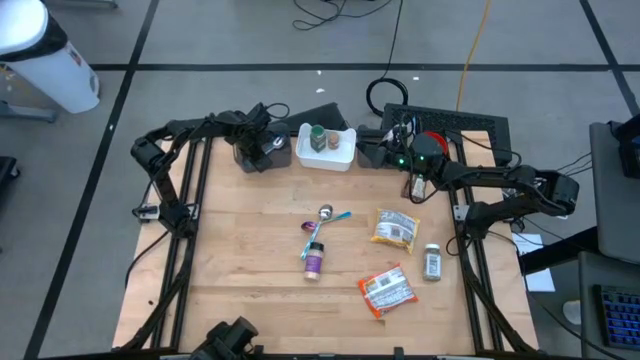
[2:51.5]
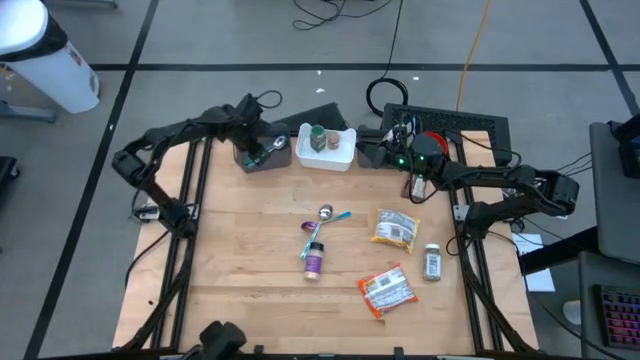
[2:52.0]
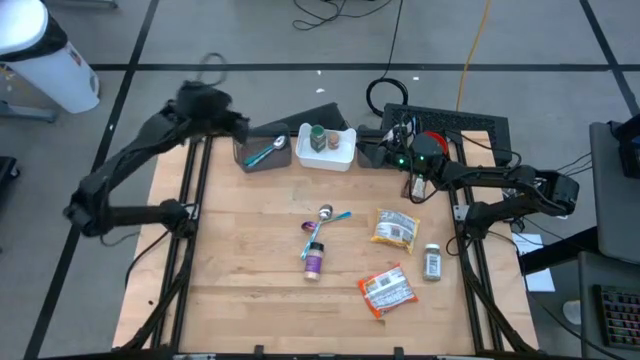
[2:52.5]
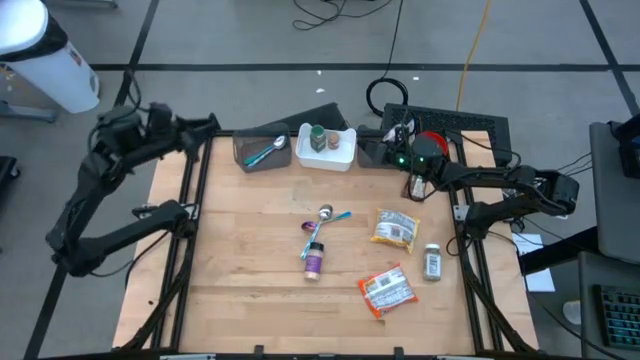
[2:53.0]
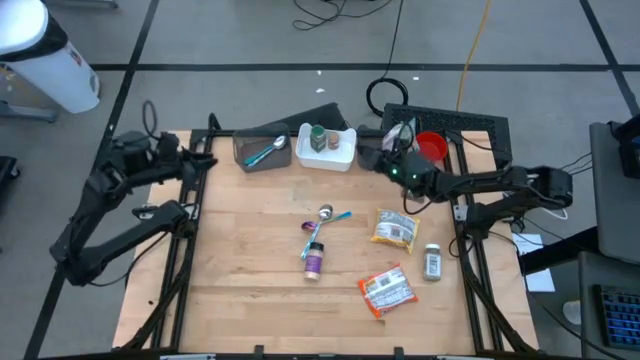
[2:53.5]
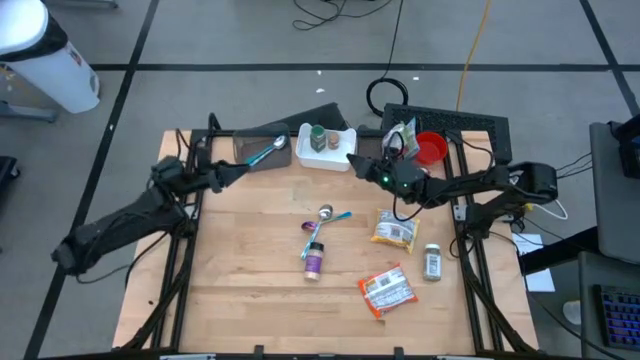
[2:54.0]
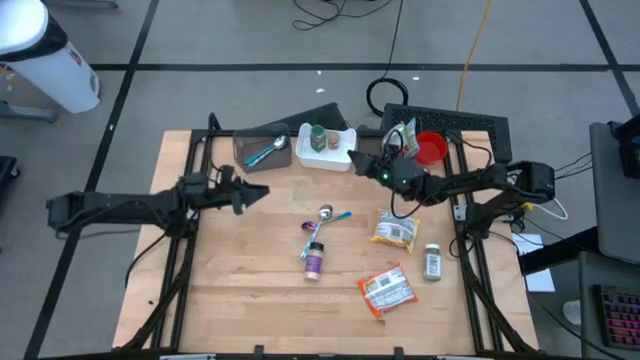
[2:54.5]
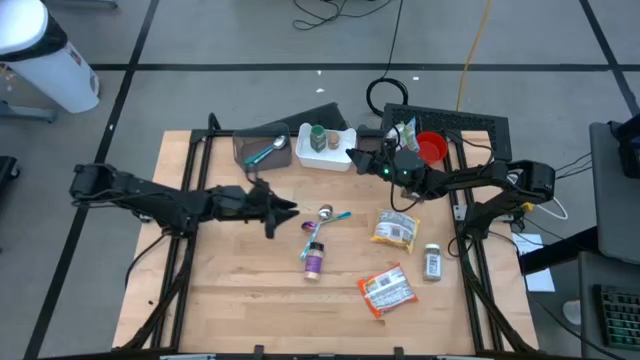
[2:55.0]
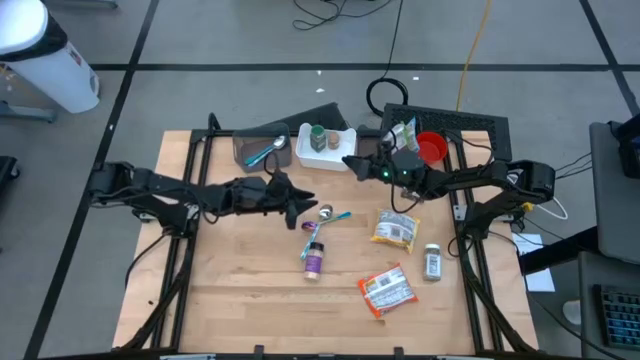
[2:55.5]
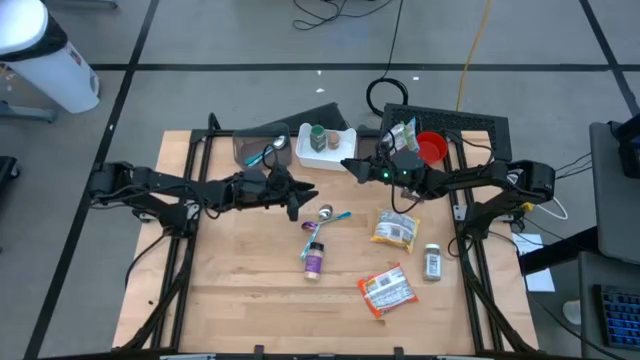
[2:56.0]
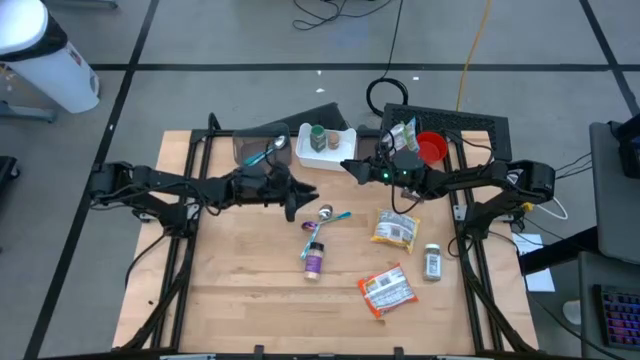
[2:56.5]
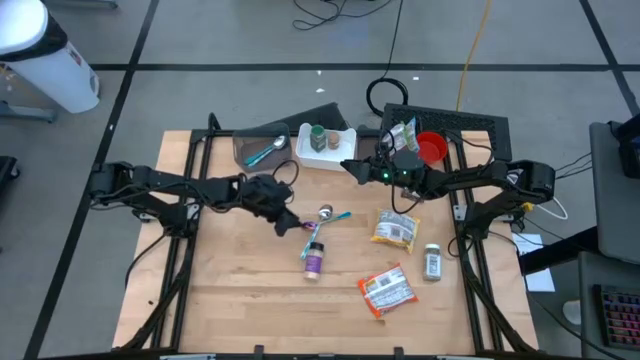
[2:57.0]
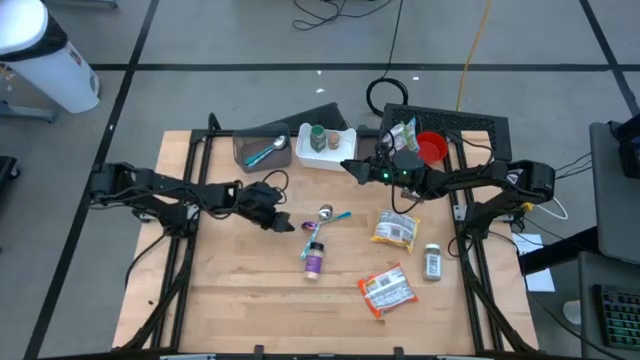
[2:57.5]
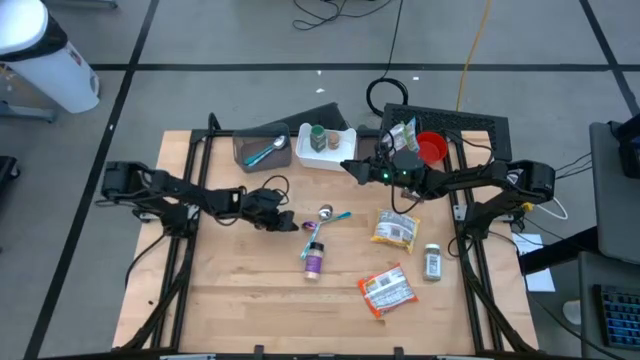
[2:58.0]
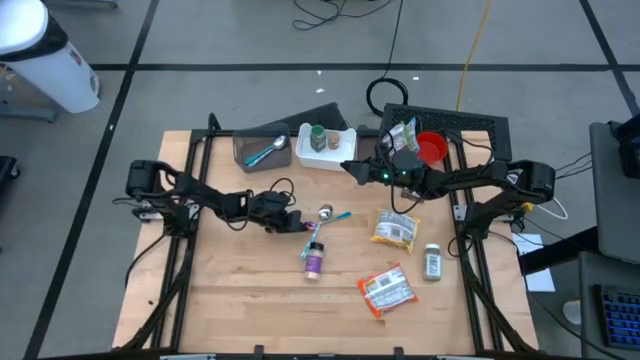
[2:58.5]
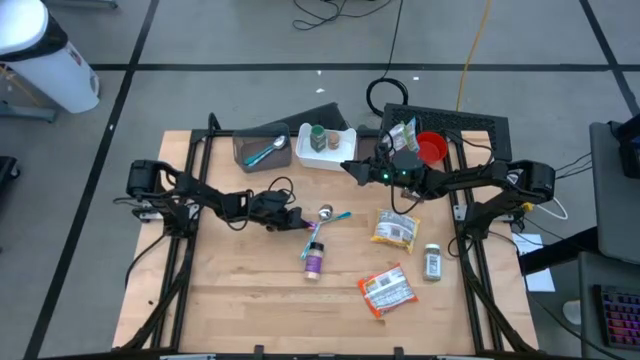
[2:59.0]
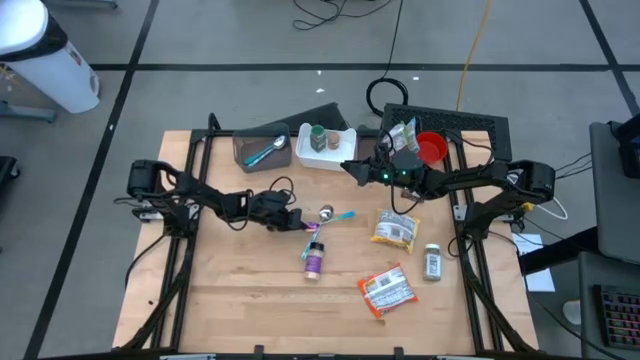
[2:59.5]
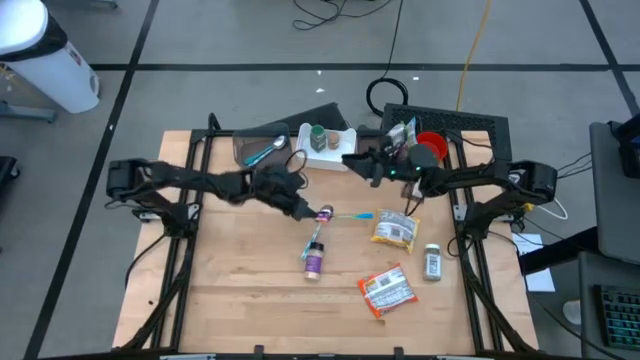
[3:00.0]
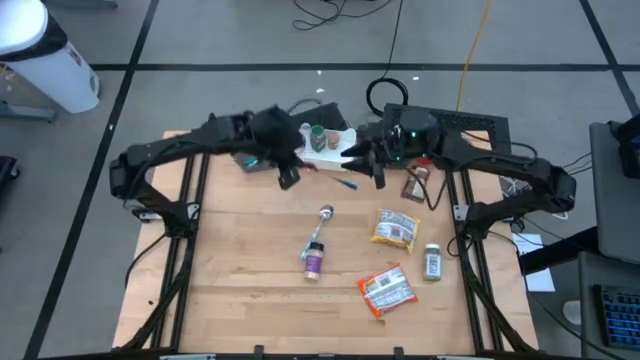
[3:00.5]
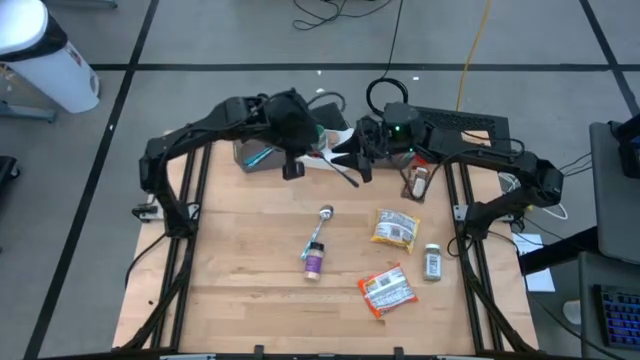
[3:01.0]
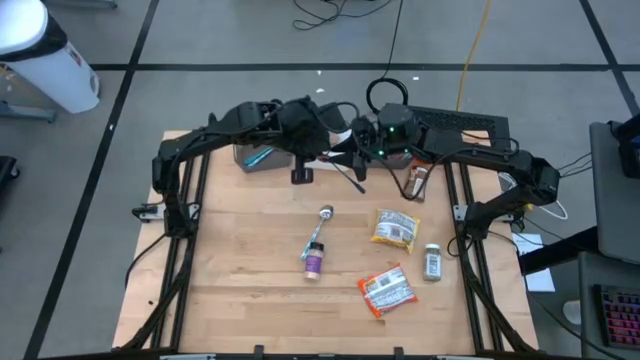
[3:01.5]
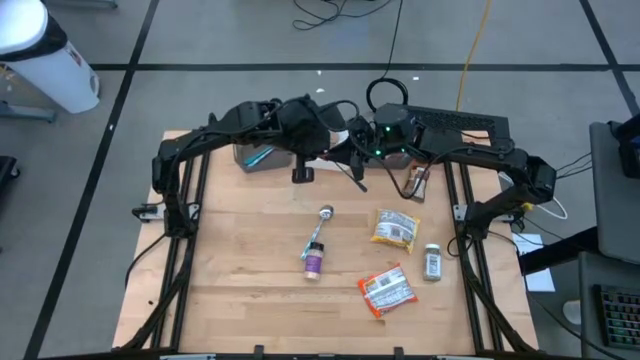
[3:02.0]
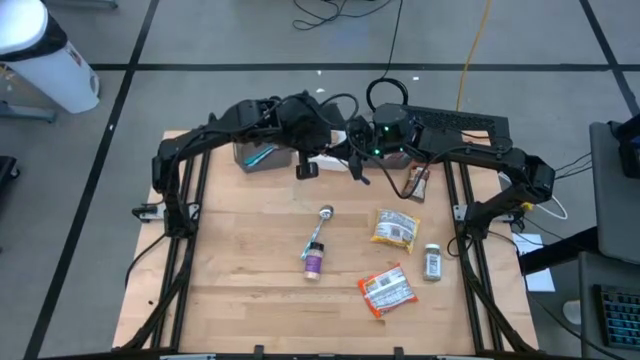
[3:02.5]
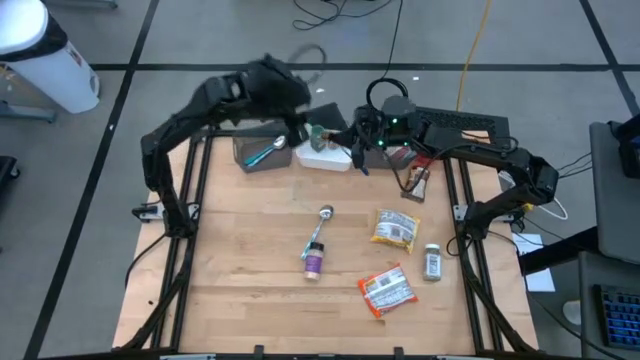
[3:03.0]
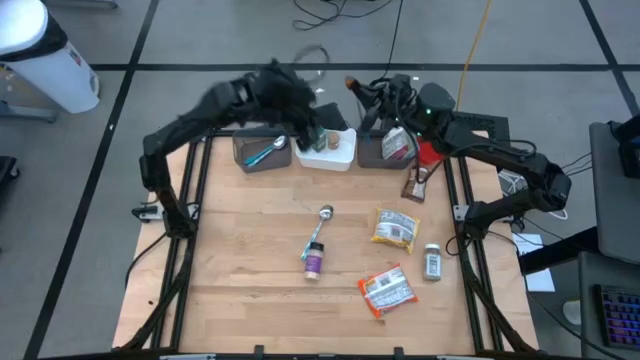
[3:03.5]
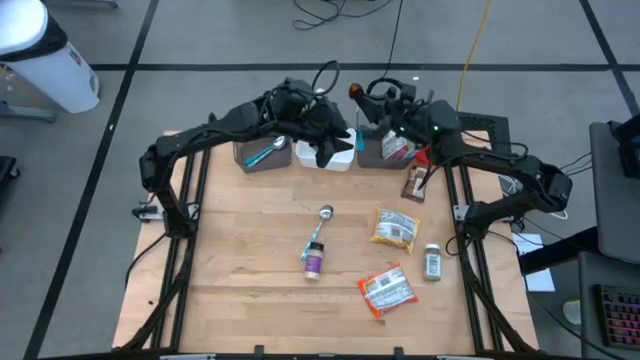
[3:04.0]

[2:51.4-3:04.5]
Task: Pick & Place Food Item
Put the blue spoon into the left black bin

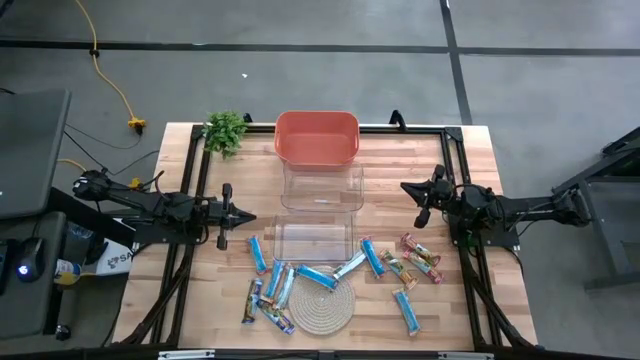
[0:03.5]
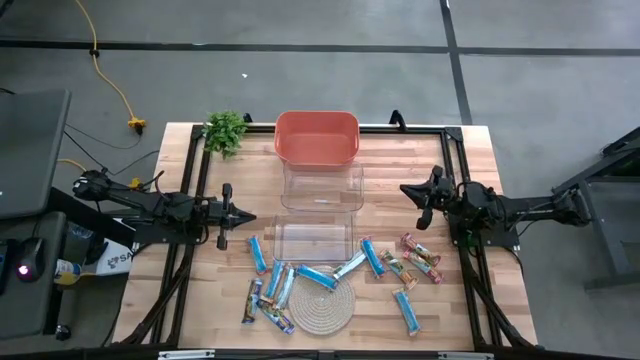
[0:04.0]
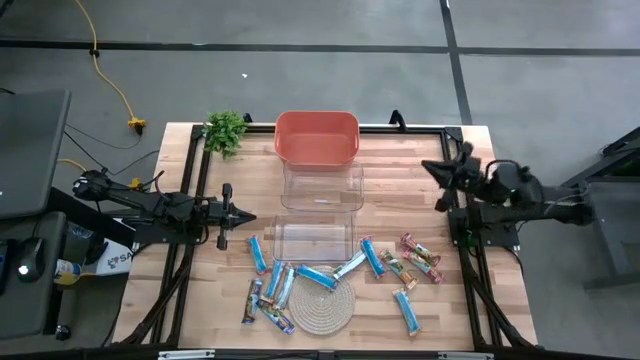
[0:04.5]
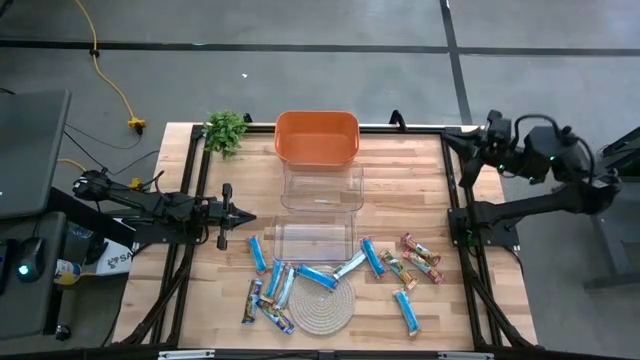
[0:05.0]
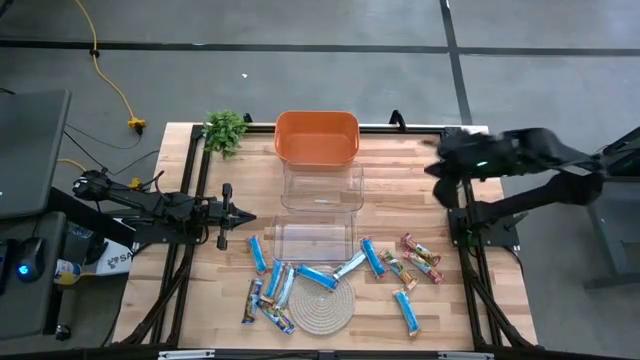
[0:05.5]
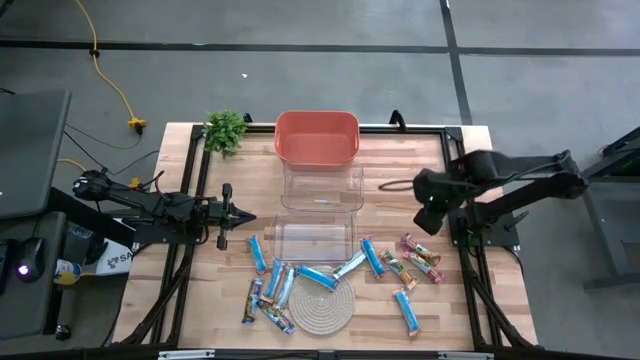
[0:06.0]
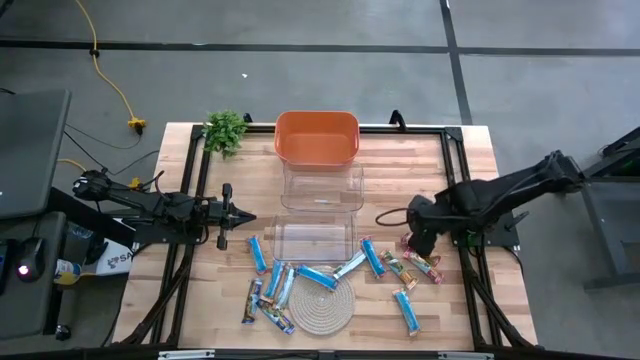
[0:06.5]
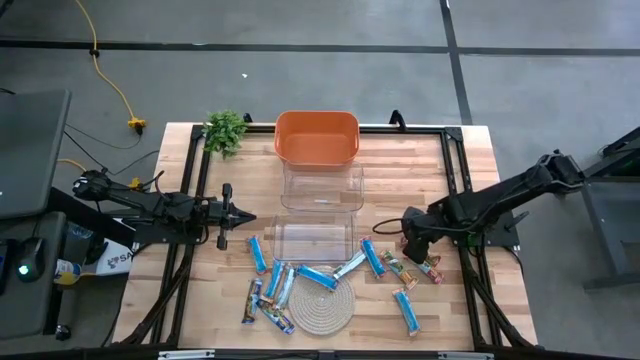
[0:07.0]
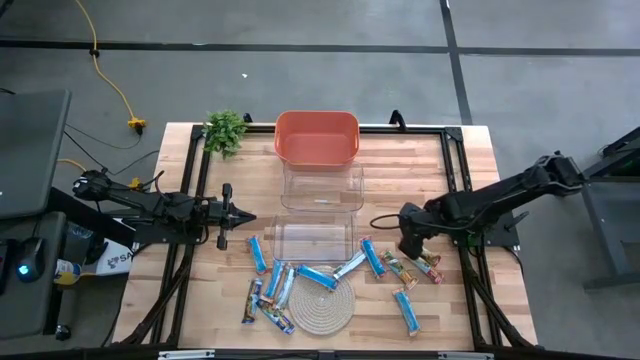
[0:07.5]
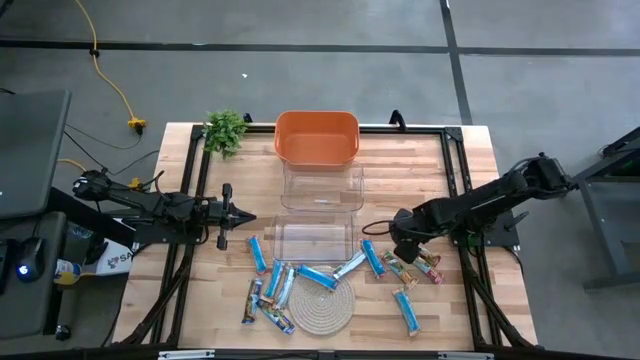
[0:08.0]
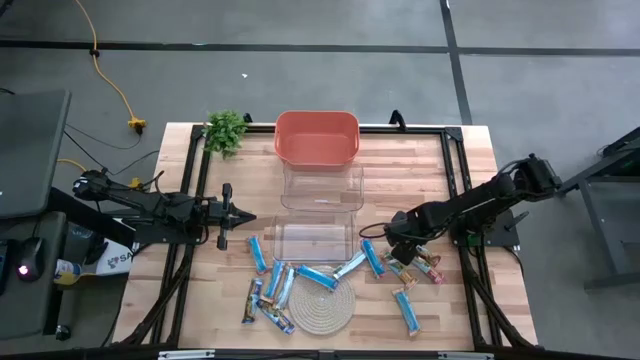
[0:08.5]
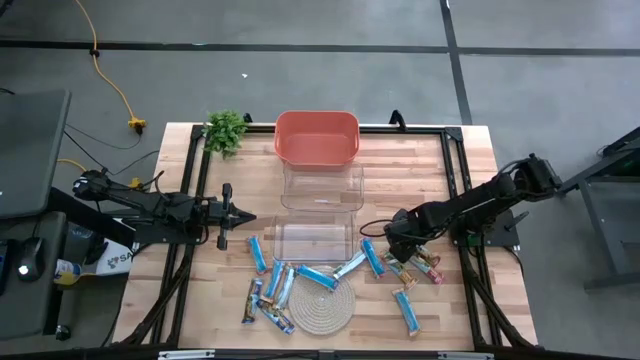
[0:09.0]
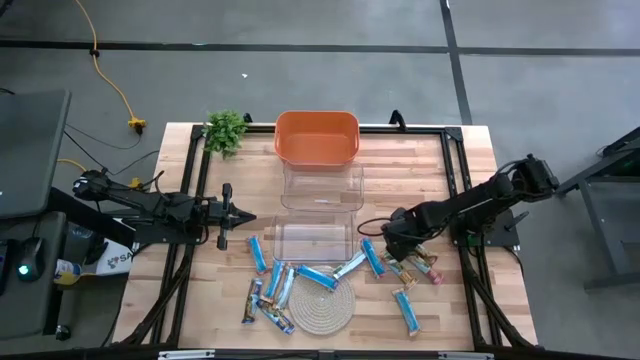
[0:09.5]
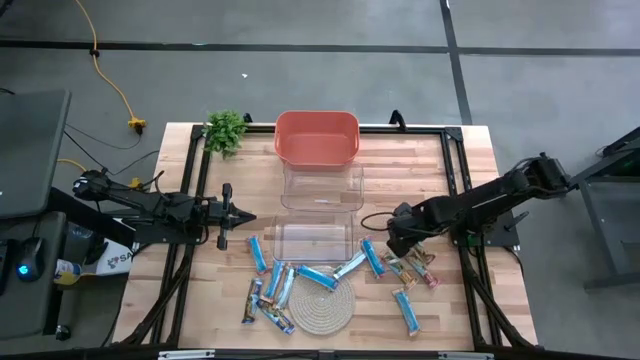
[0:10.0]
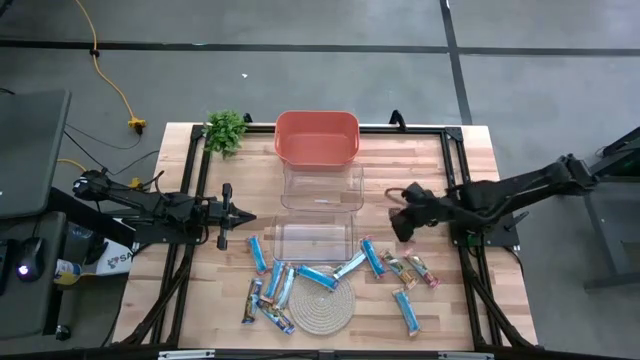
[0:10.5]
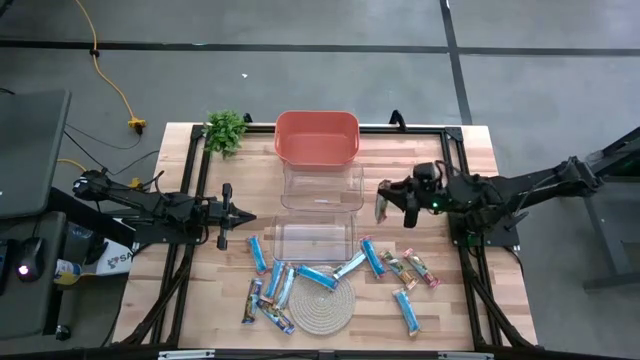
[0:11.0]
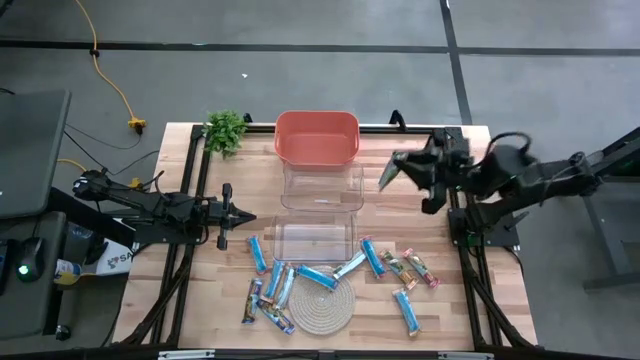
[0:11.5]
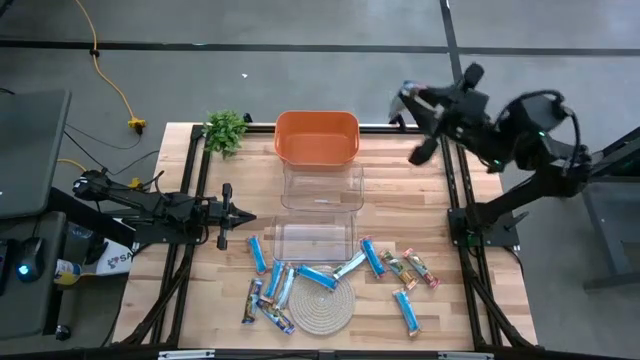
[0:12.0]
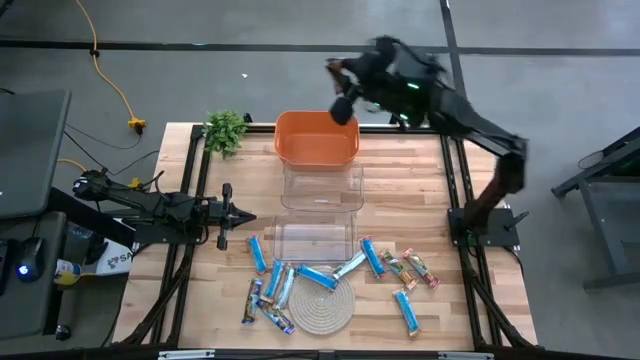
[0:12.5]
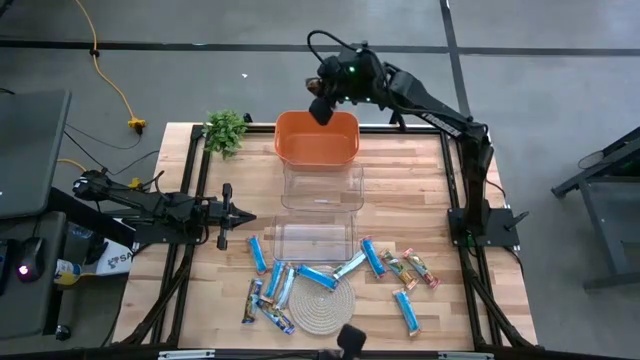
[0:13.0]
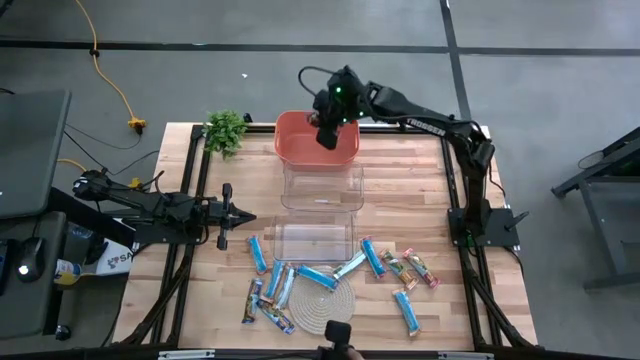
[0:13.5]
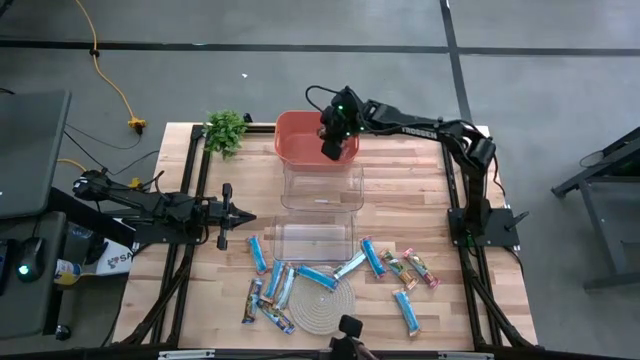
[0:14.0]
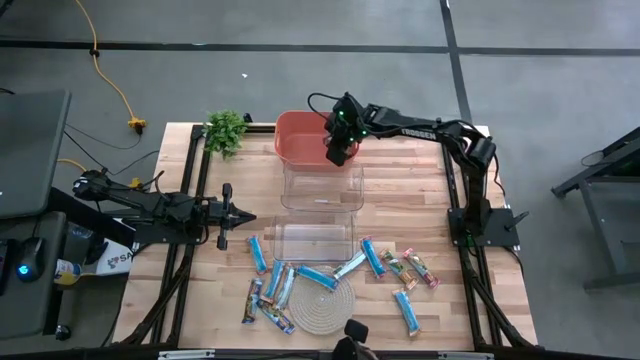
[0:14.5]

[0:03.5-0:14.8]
Task: Pick and place Granola Bars by type
Put the red granola bar into the orange bin
